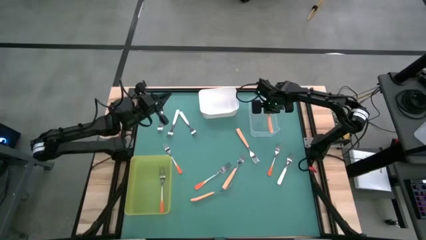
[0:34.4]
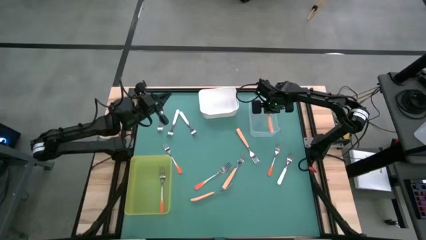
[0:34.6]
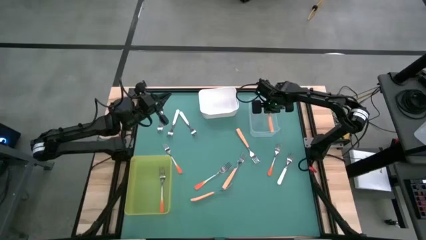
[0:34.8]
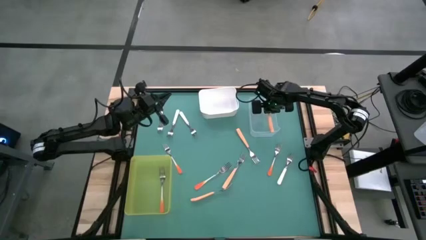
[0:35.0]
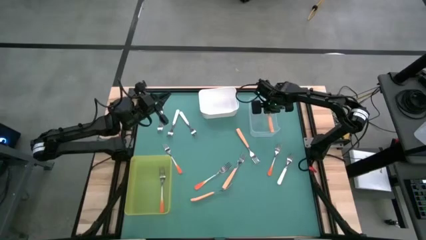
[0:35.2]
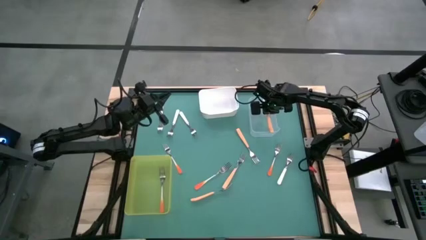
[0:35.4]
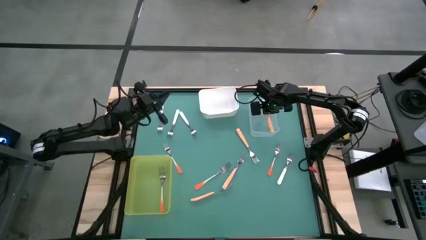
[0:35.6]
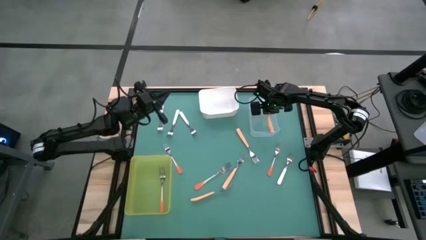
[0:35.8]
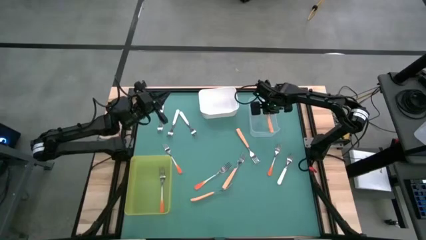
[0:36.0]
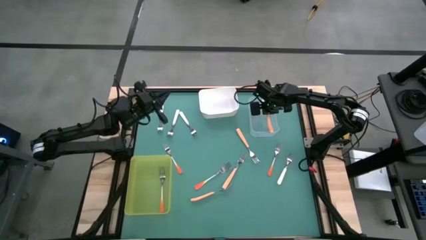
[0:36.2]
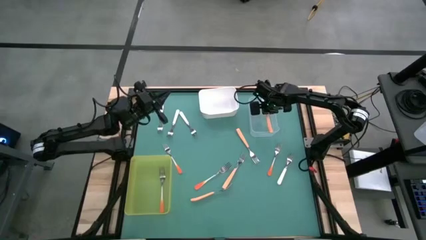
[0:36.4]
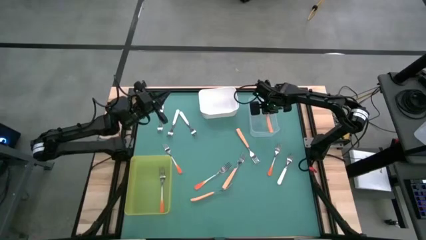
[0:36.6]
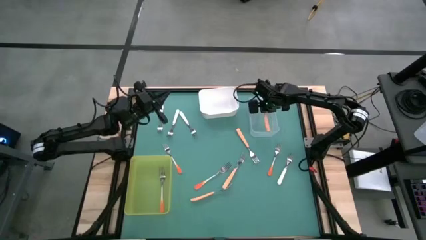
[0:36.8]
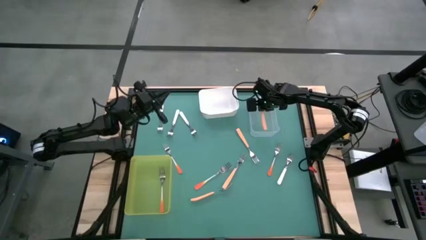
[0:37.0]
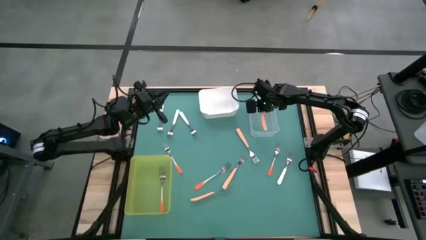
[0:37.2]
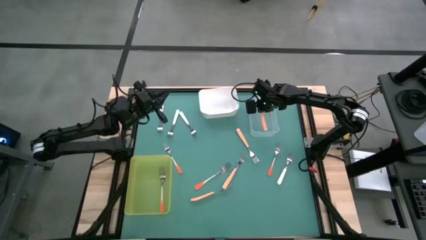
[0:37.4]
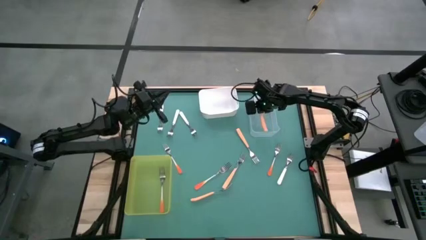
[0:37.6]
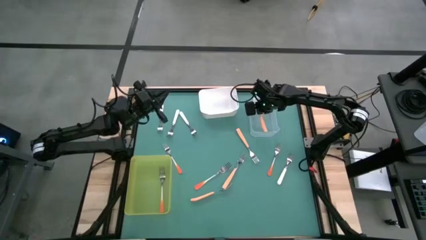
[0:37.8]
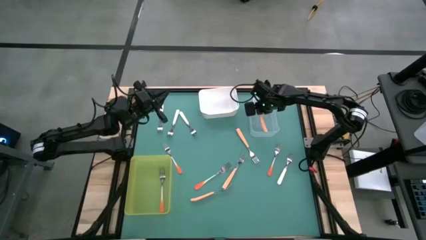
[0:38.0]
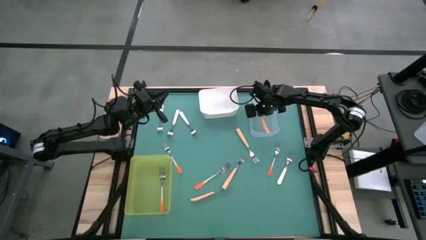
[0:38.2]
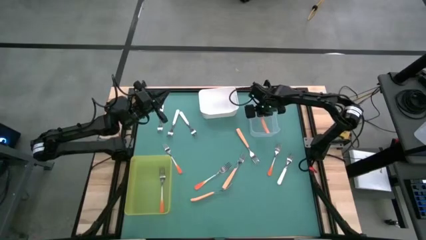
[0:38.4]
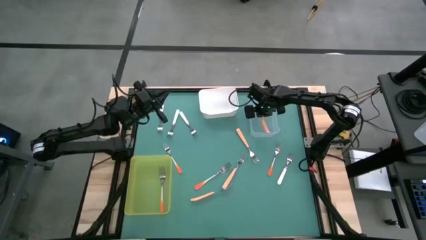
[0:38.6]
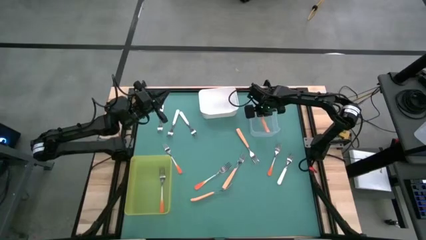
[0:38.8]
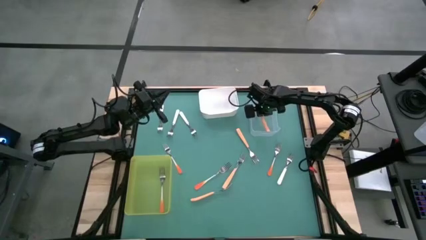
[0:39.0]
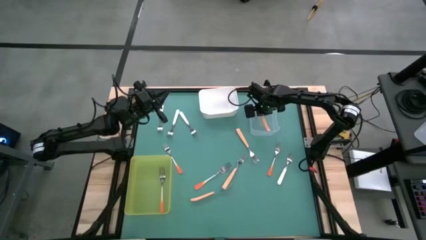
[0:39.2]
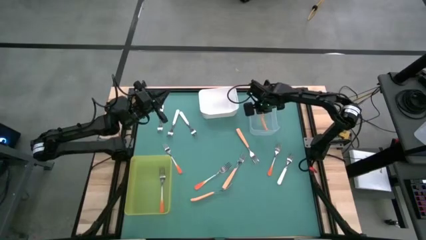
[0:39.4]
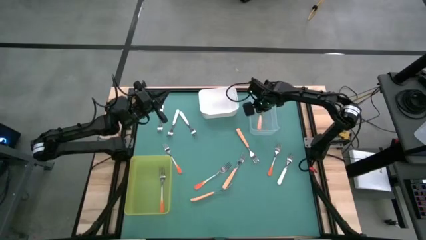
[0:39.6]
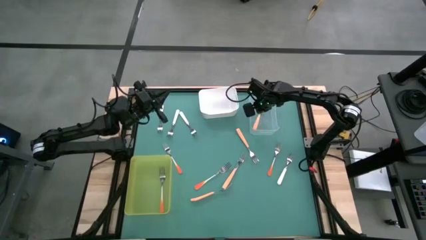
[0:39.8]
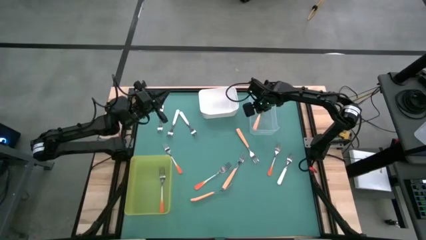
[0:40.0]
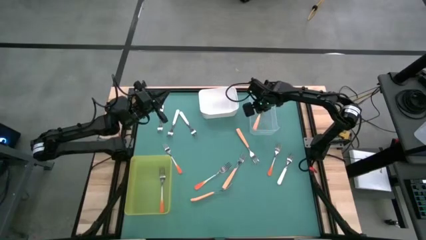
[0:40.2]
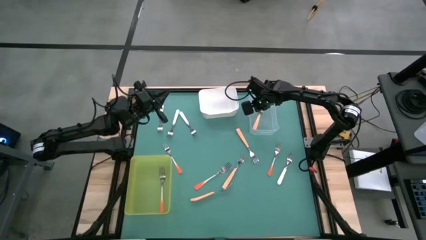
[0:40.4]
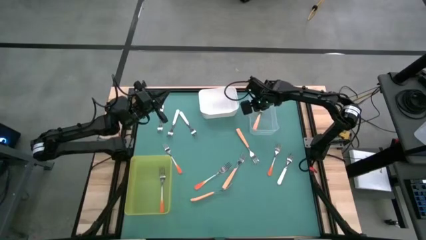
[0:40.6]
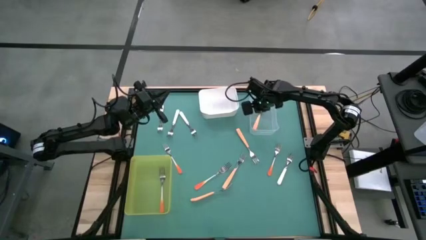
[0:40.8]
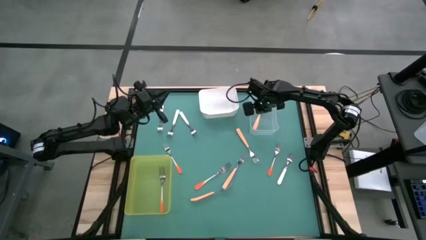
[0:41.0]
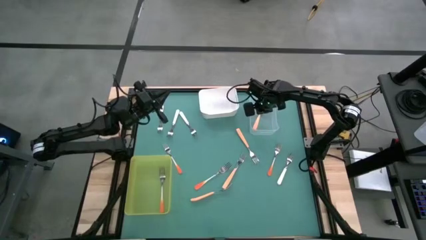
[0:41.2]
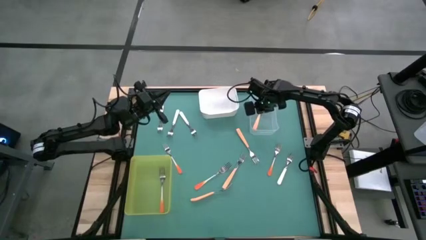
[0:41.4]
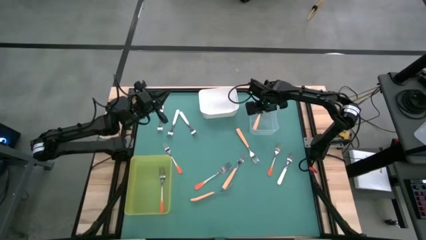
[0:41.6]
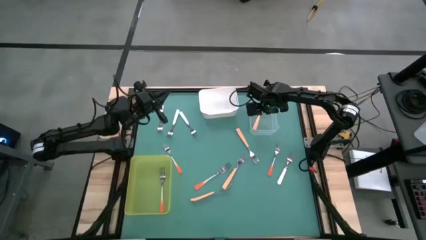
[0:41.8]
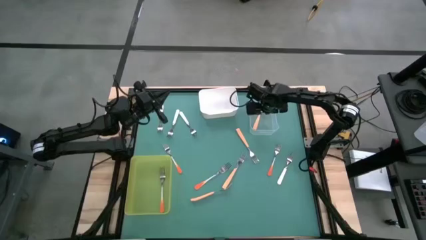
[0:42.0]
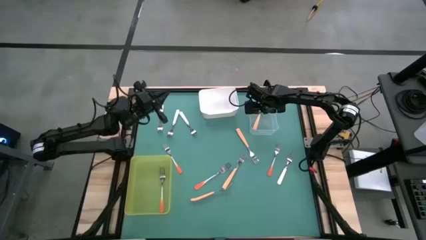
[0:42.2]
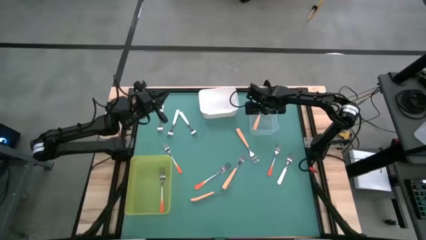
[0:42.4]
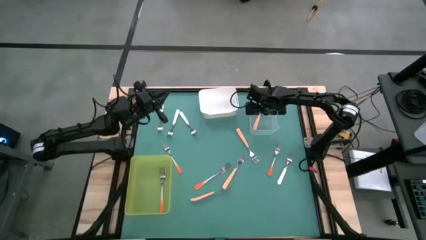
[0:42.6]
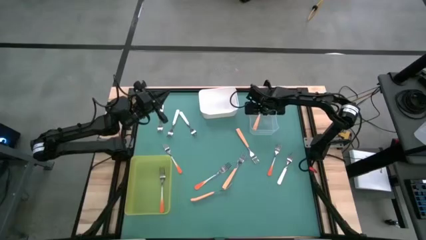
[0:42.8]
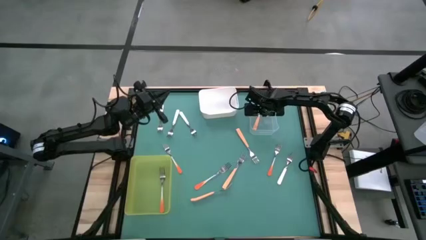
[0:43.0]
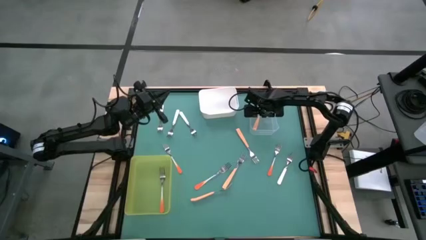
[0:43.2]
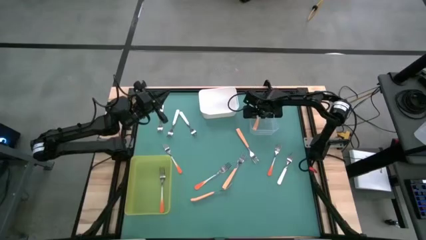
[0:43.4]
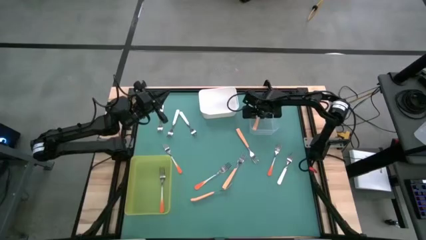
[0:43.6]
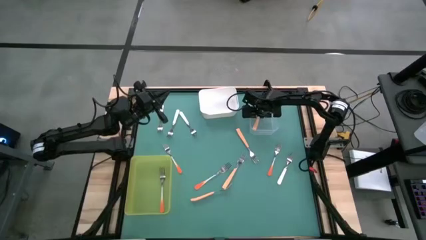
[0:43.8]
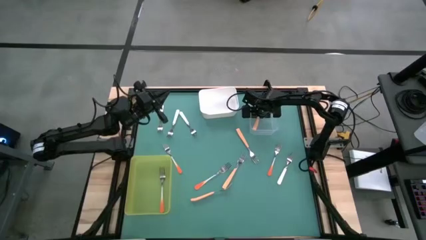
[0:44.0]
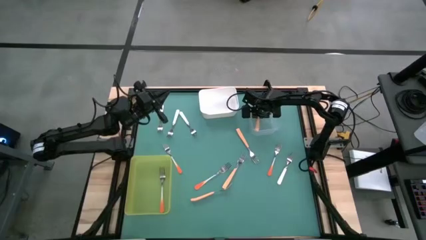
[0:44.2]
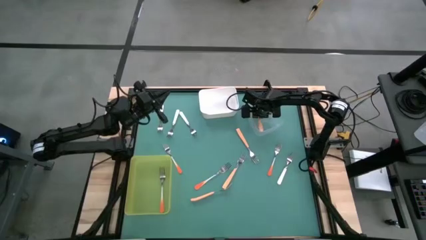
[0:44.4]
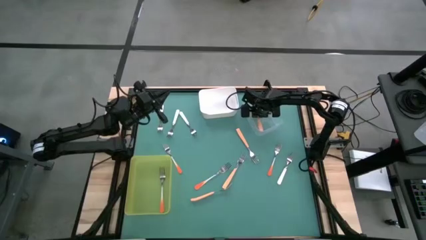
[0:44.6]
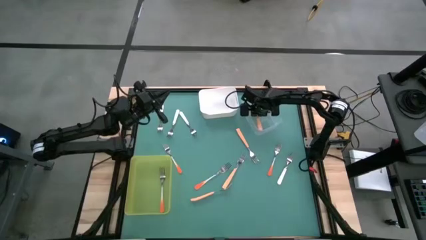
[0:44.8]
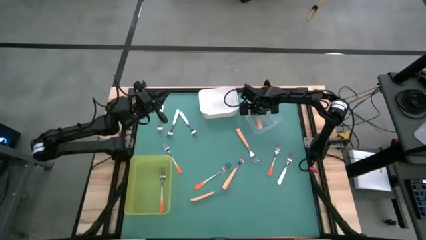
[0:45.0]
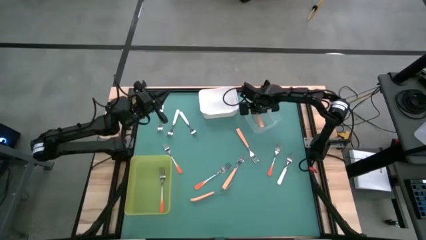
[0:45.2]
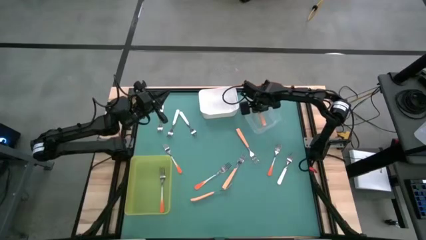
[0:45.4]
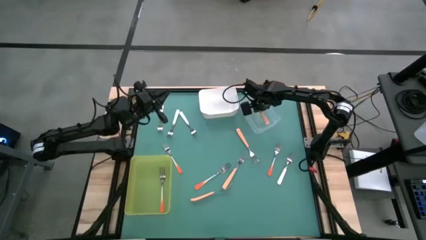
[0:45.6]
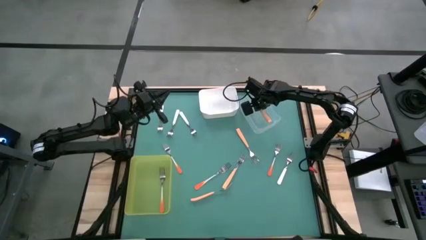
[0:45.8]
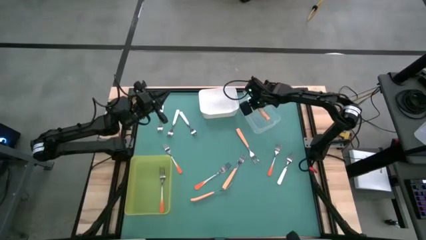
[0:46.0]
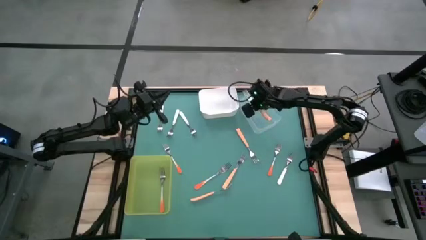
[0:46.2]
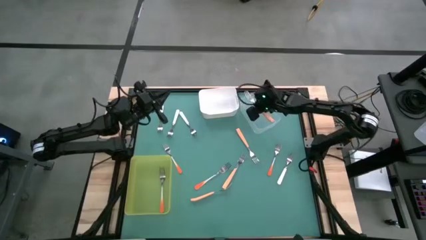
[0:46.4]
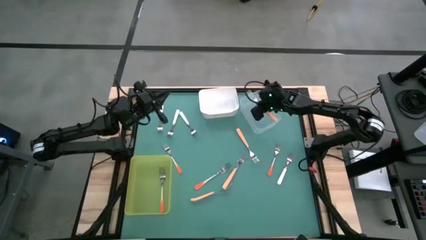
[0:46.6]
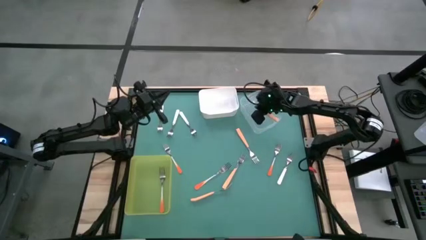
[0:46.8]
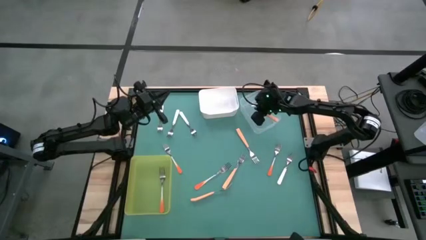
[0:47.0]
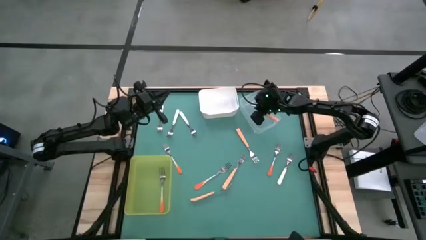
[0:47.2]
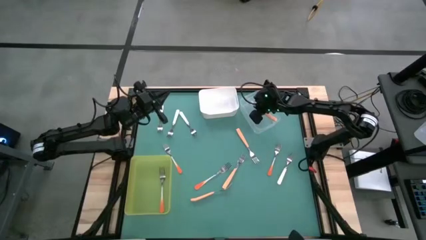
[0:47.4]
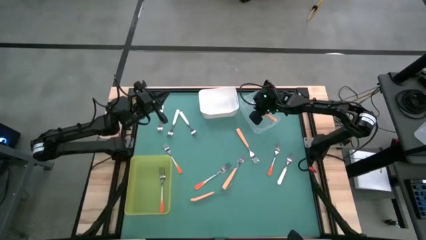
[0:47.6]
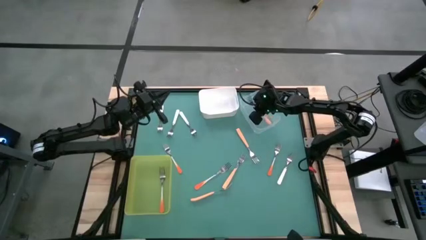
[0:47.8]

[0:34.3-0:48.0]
Task: Sort silverware by color (type)
Put the light orange fork into the transparent bin

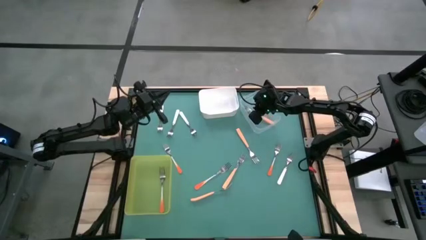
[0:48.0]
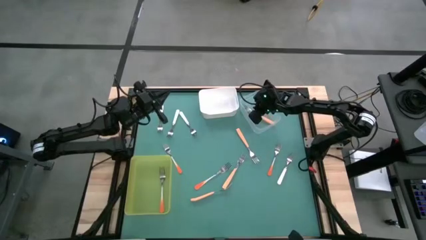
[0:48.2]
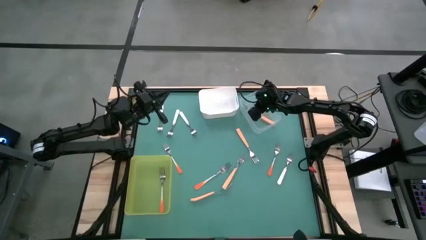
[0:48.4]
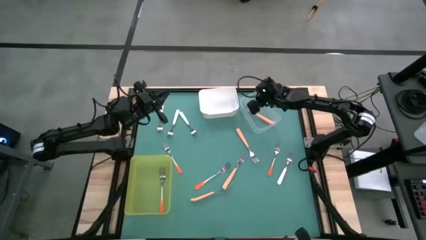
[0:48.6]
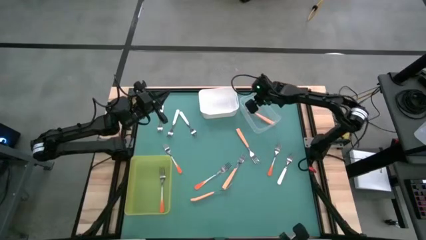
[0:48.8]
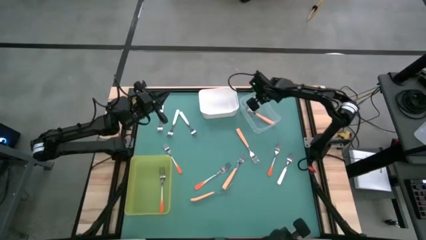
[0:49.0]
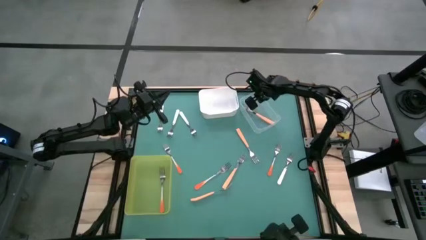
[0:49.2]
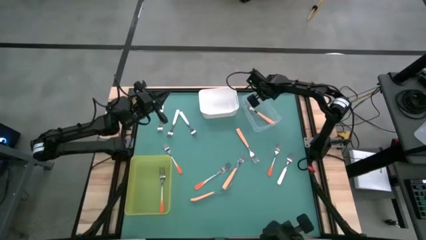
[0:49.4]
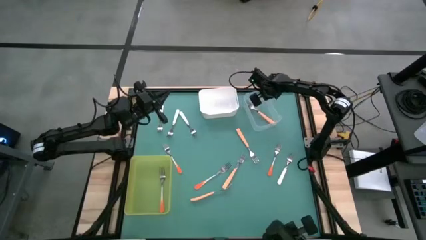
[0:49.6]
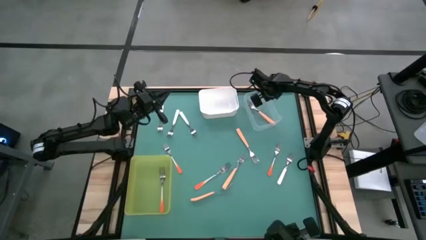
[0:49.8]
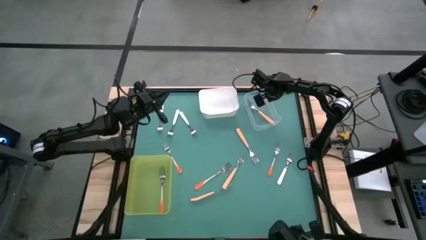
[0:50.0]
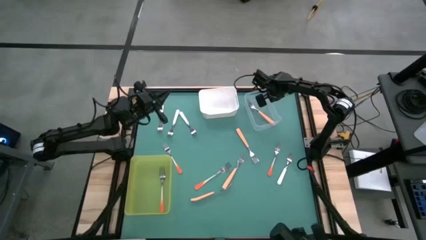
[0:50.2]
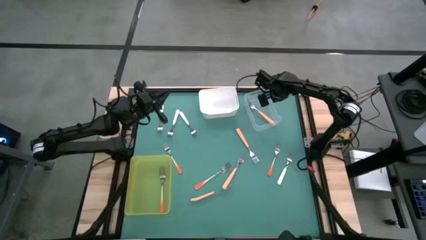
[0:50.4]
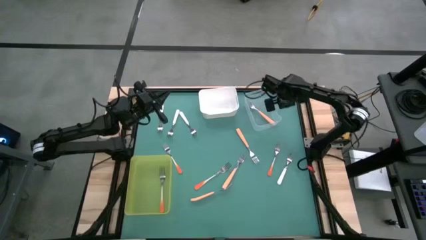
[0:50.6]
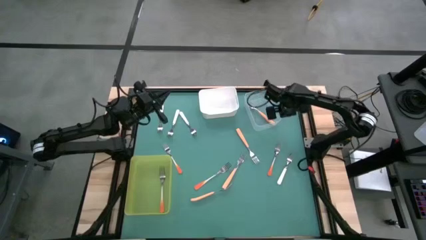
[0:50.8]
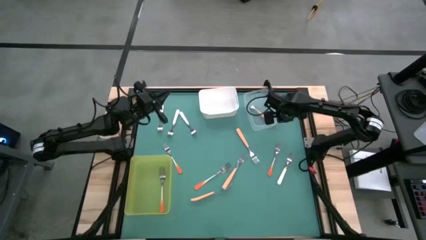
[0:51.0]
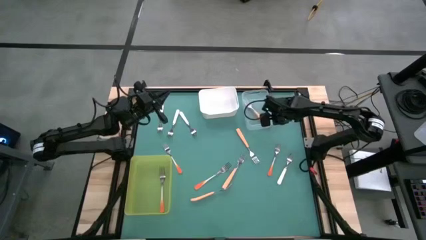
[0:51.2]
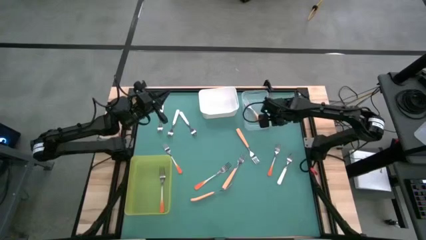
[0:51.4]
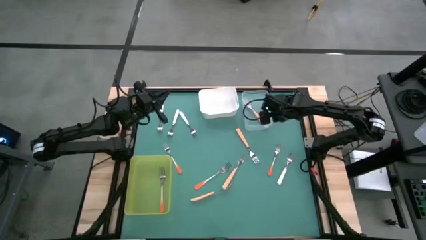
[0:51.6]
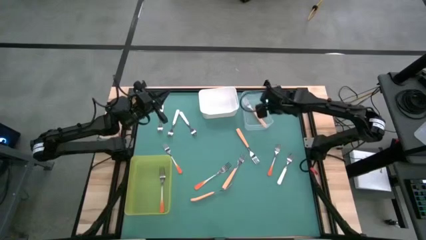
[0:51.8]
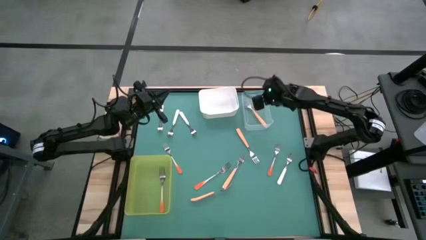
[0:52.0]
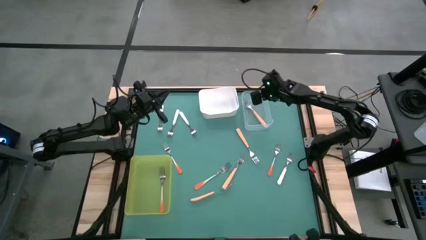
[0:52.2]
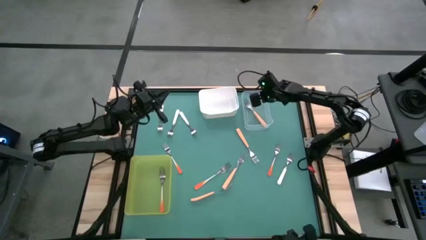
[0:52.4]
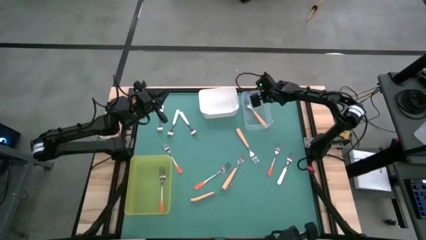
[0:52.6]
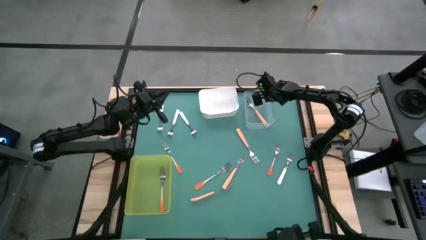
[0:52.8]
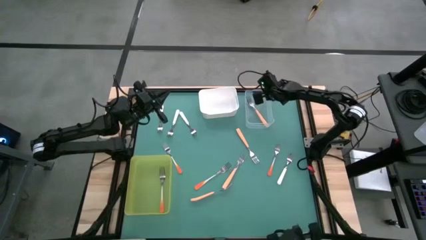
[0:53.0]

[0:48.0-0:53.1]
Adjust the transparent bin
